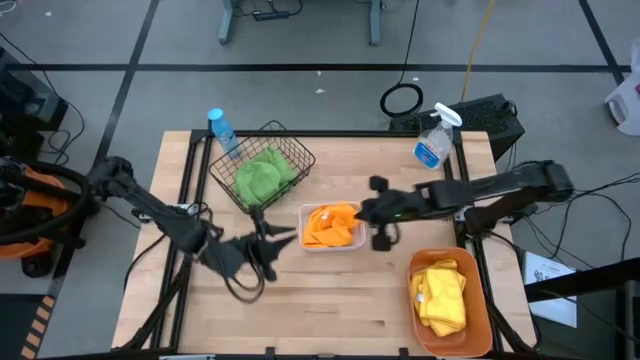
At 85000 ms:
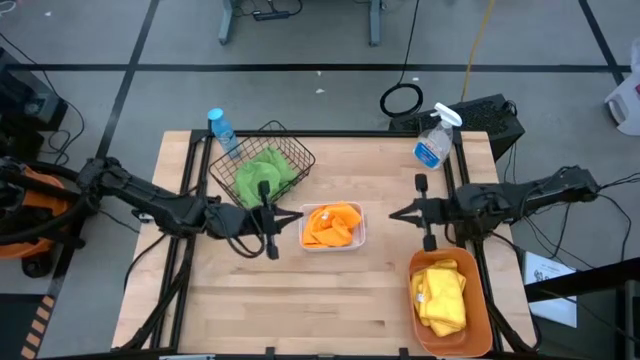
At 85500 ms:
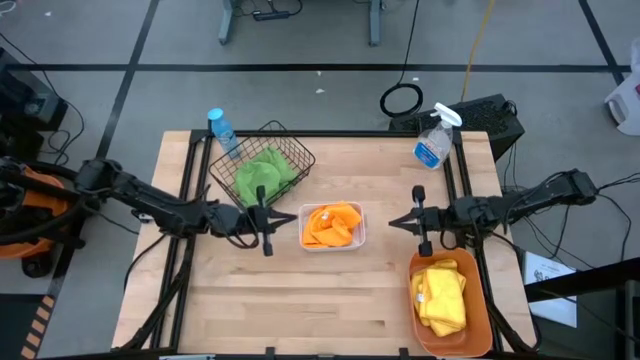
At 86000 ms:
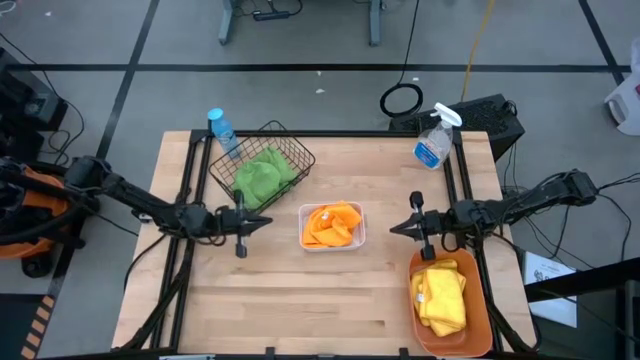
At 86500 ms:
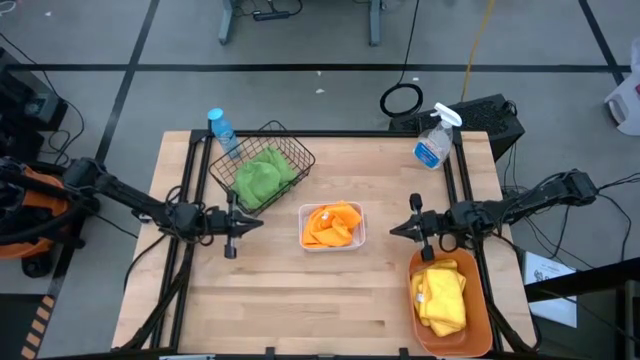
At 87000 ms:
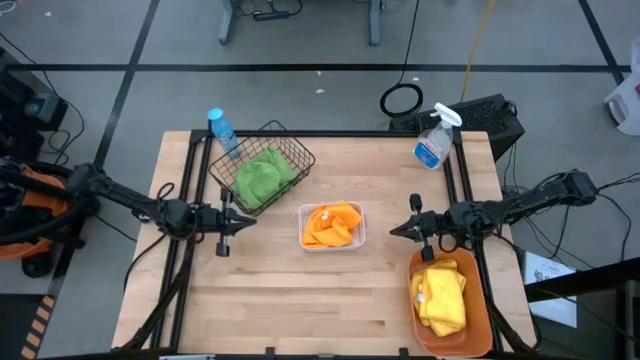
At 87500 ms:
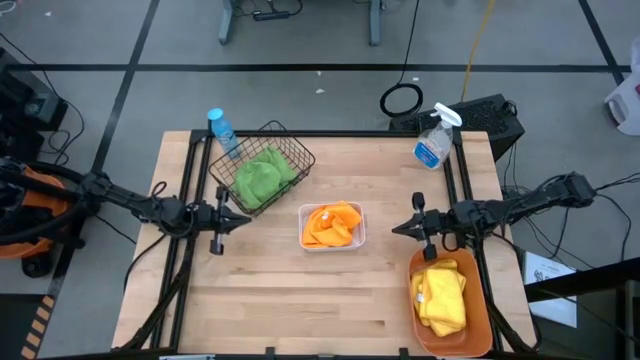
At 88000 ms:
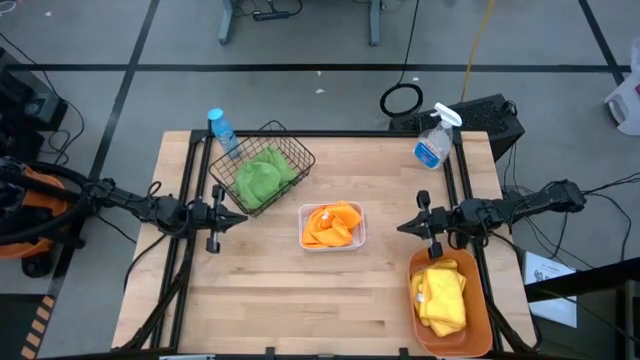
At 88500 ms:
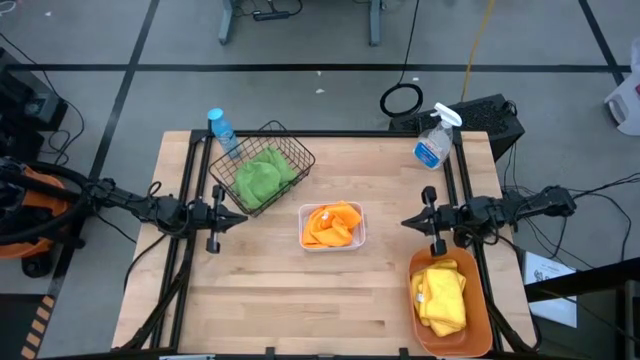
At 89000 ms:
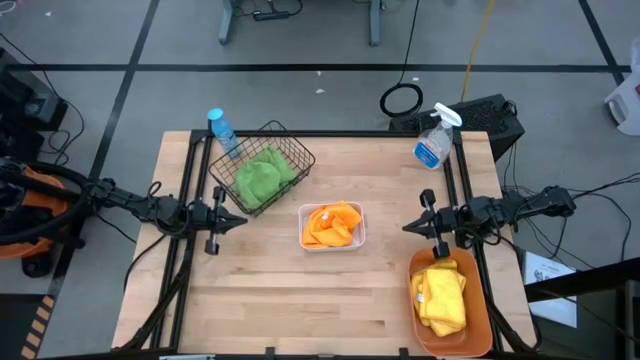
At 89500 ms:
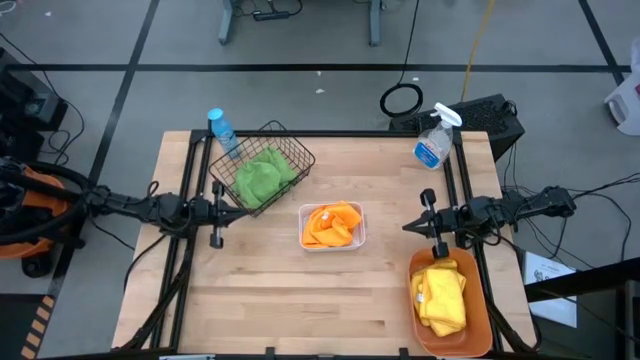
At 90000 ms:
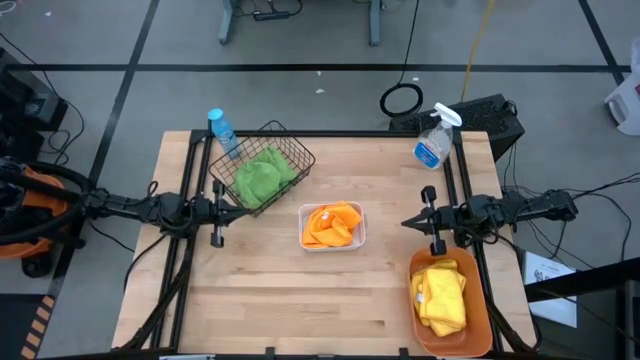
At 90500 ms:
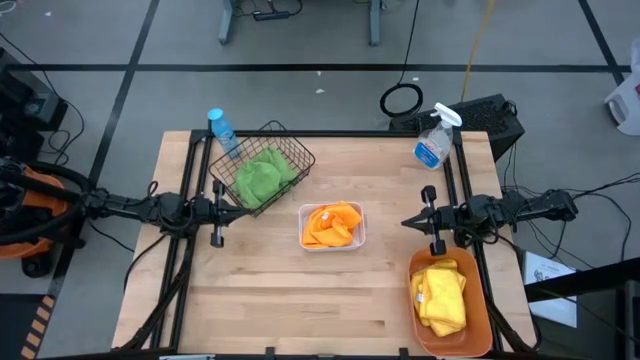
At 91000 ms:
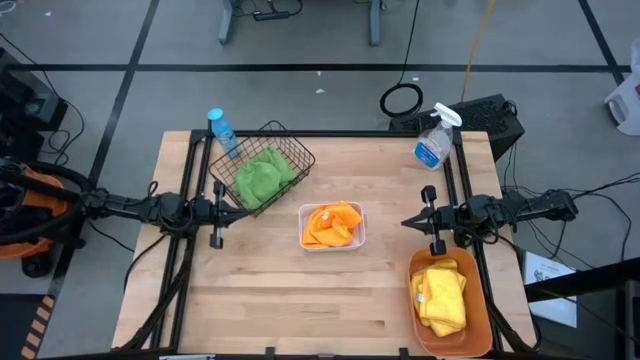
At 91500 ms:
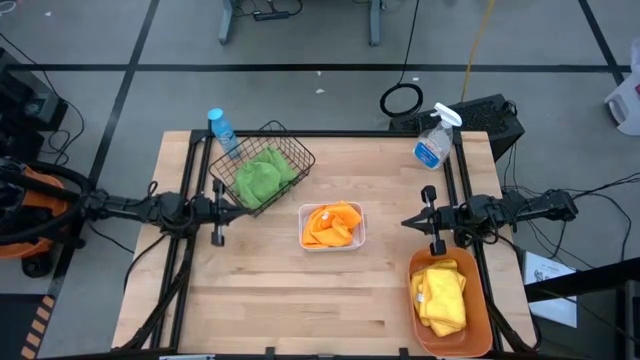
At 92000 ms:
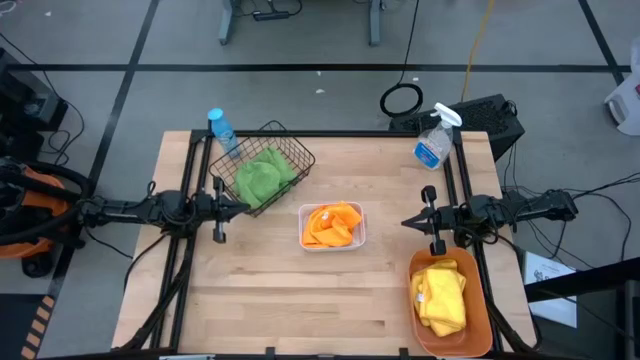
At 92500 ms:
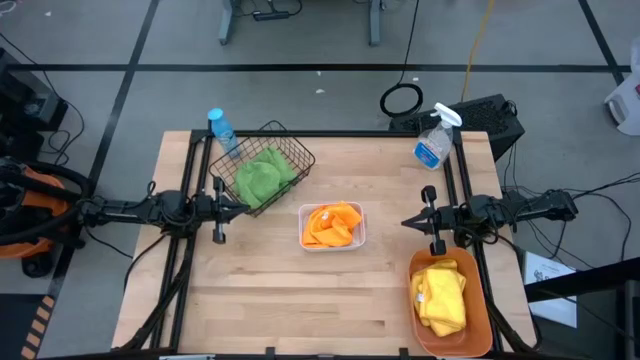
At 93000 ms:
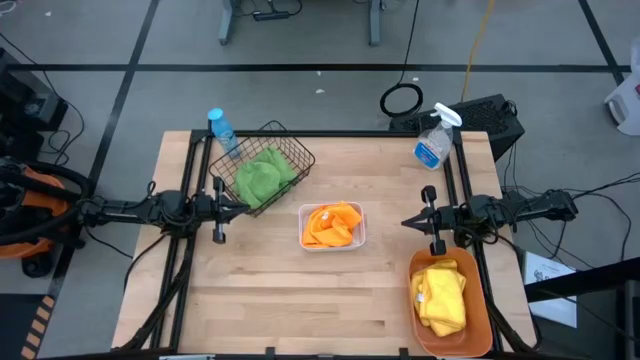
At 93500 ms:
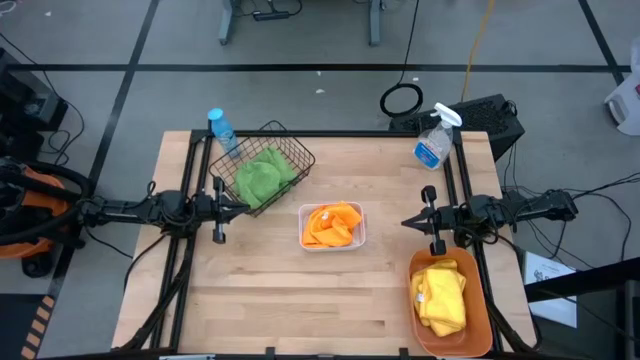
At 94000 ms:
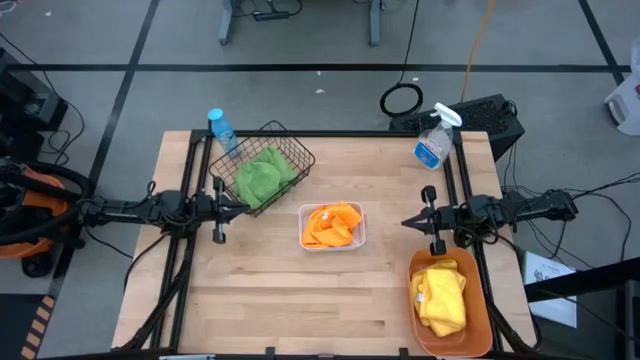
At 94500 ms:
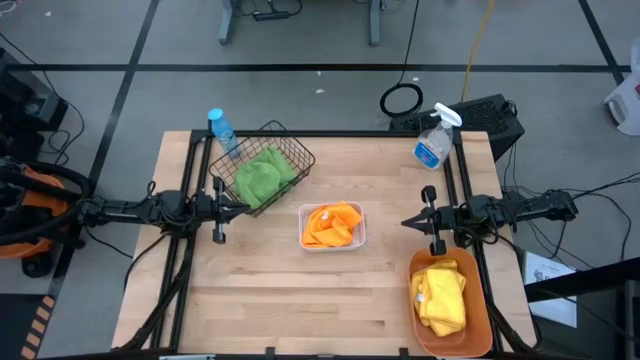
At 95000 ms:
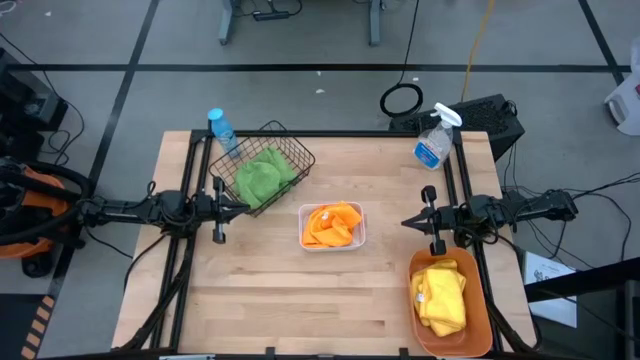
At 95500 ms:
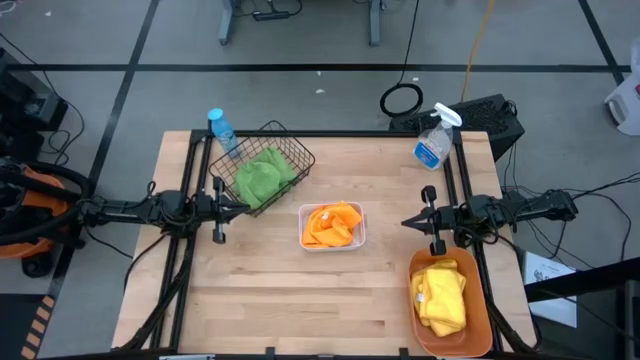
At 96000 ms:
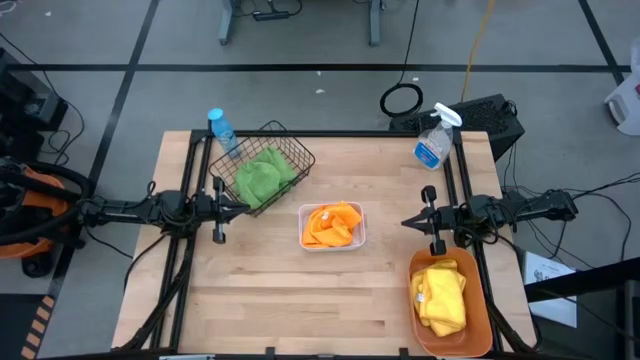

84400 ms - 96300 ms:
Task: Sort microfiber towel by color & place in baskets
Return to Home Position

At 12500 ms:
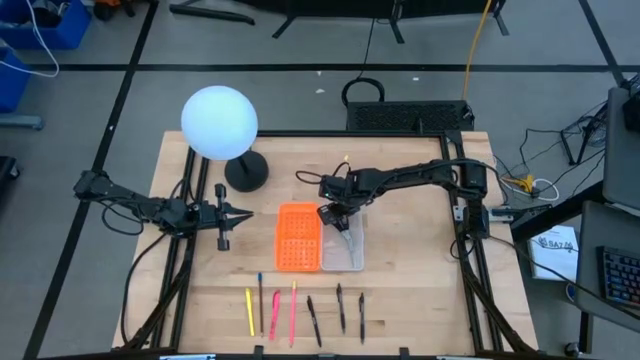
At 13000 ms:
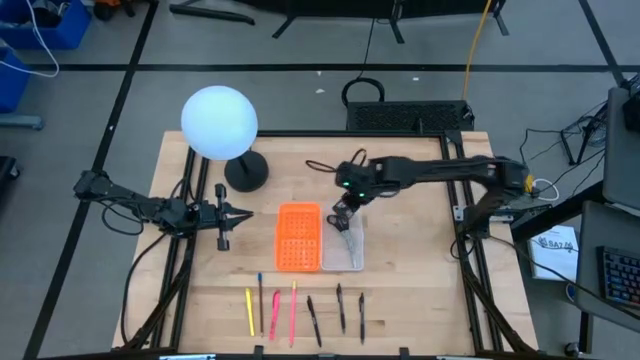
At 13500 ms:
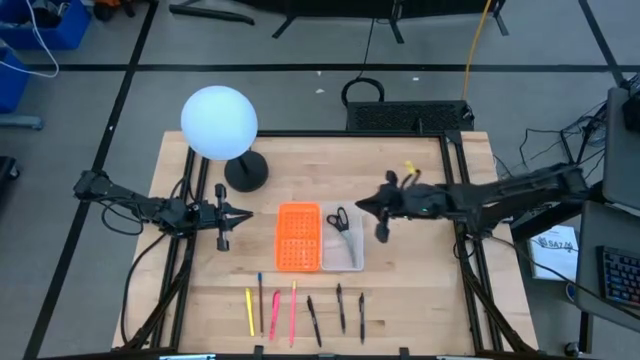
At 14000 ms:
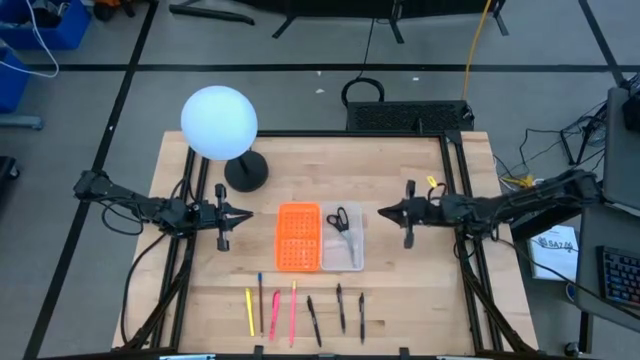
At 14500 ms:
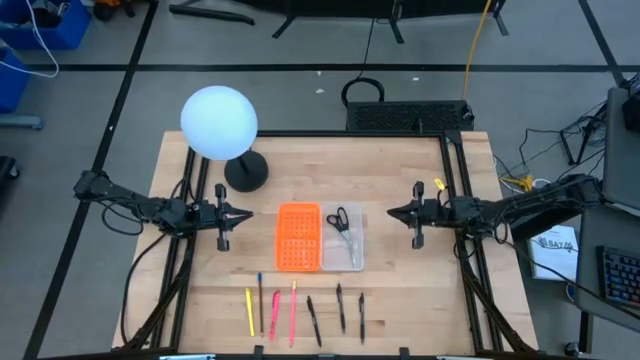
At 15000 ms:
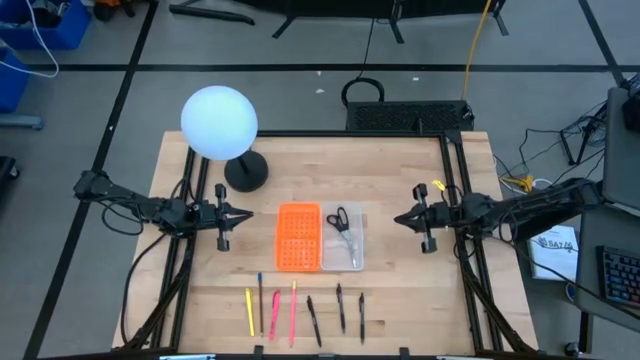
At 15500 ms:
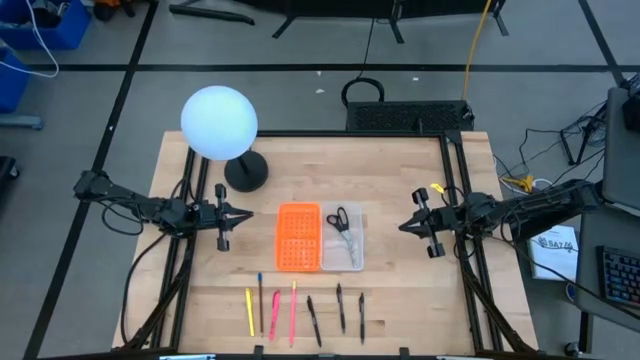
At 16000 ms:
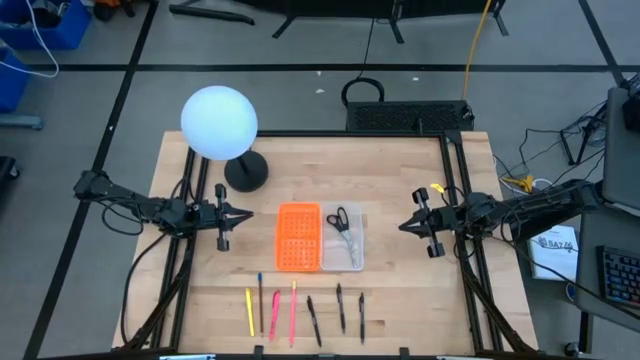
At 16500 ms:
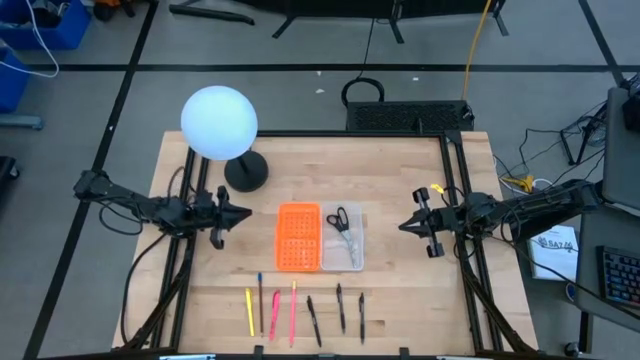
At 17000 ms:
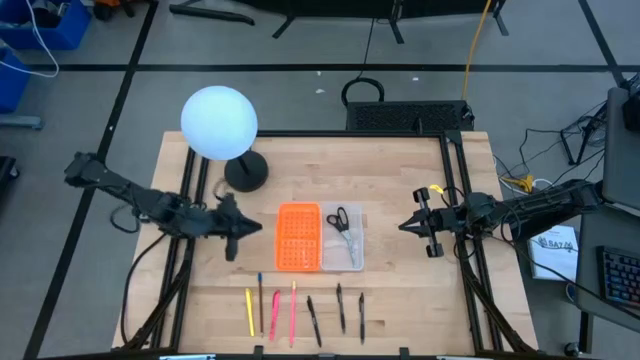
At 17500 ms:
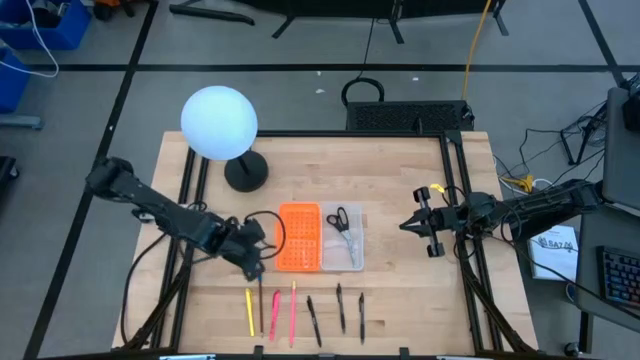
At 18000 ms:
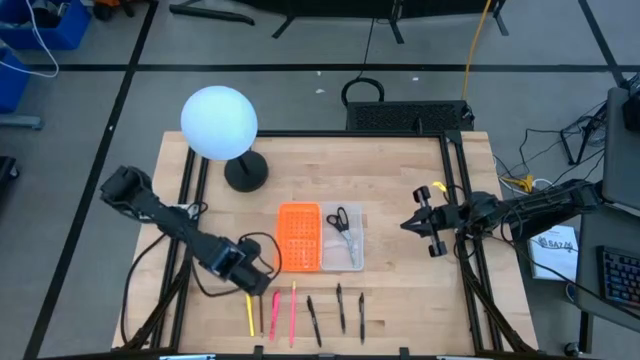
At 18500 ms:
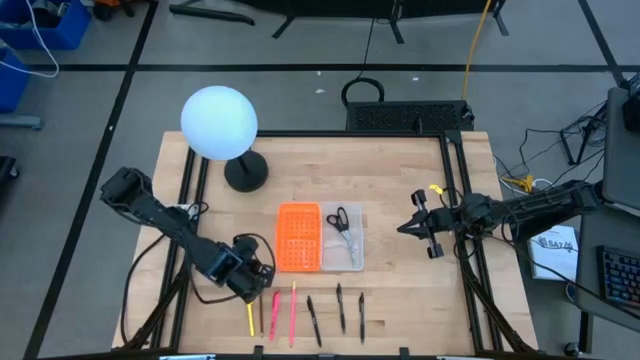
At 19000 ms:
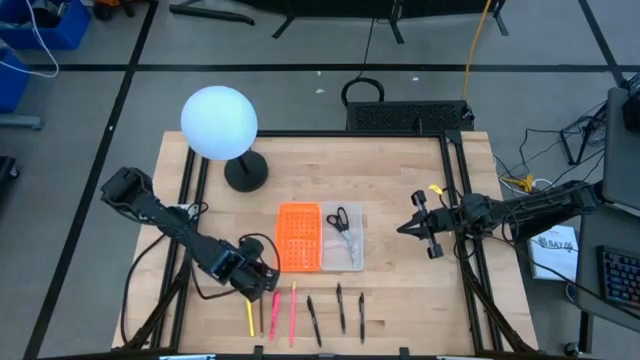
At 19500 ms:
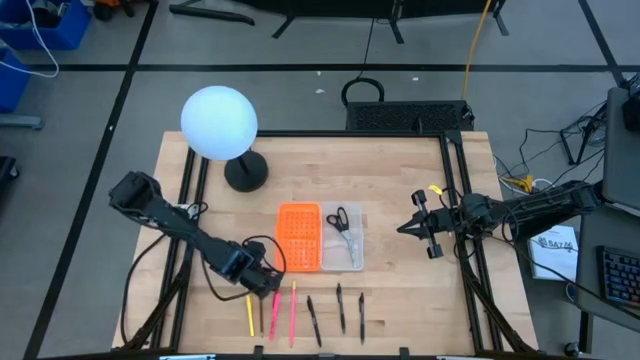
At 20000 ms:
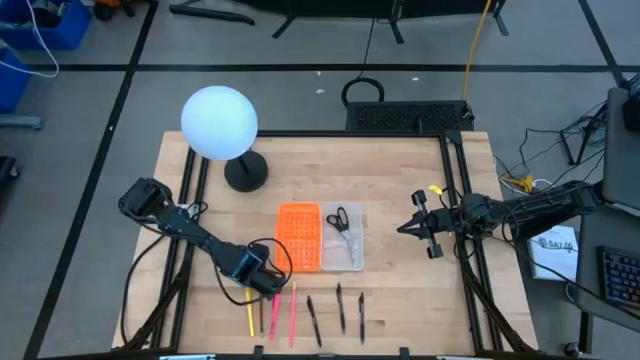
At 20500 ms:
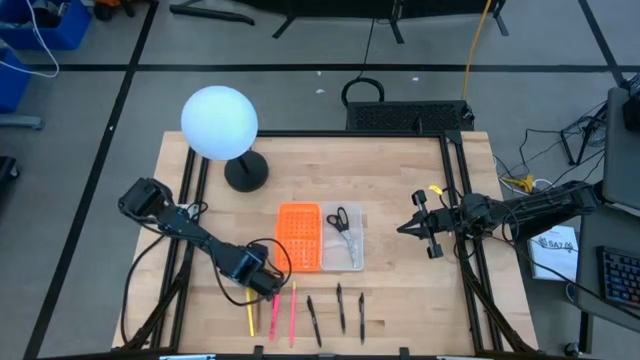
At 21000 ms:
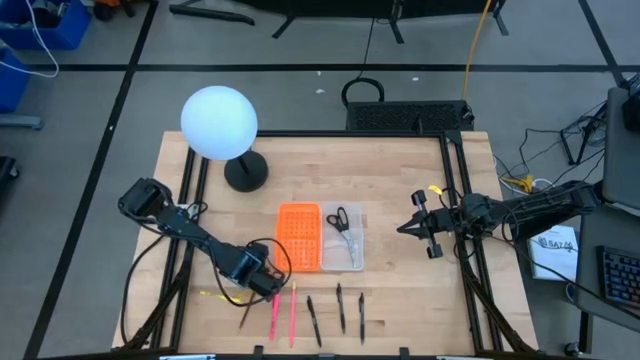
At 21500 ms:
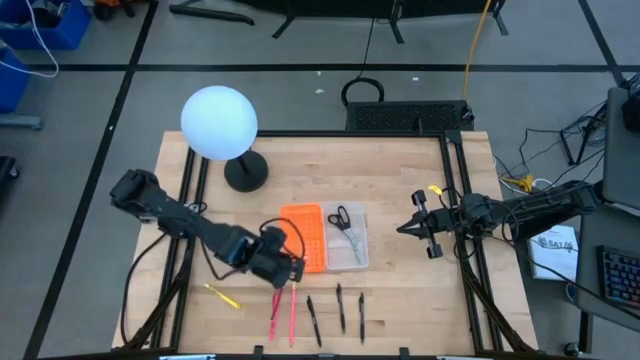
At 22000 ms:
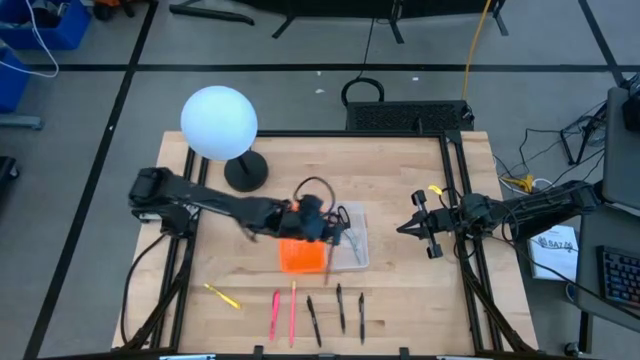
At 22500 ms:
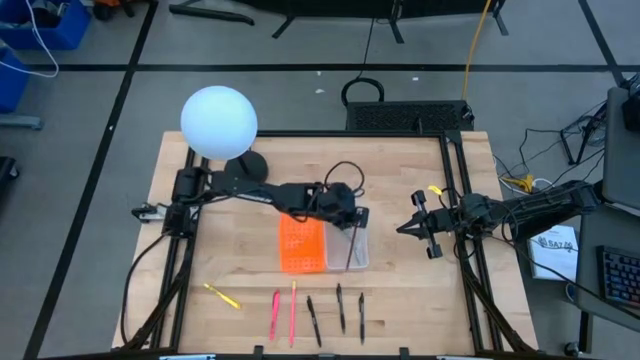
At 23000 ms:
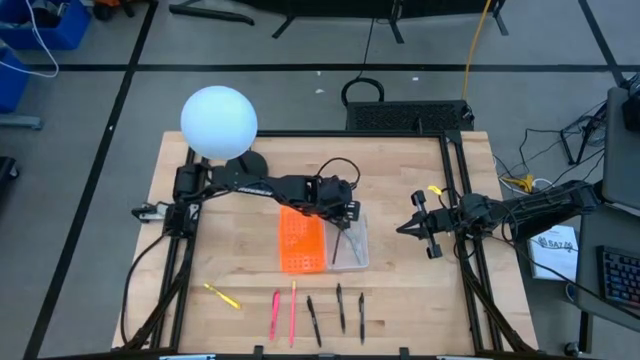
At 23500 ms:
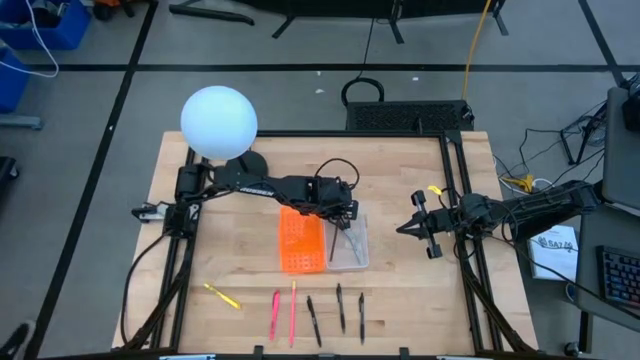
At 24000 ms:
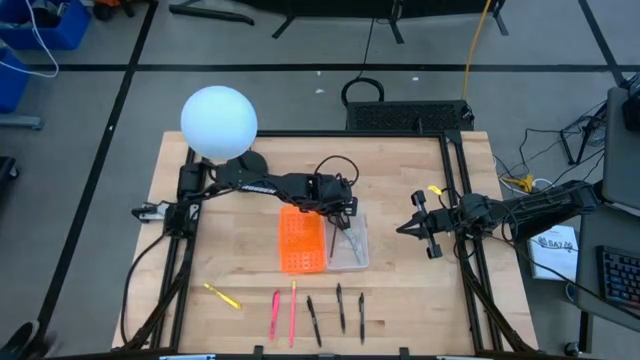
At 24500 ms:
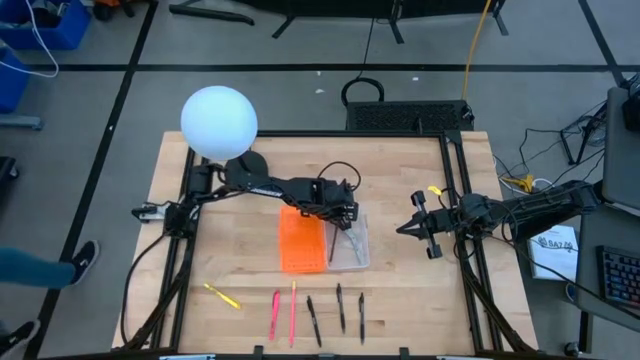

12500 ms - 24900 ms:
Task: Pick & place school supplies into a supply box
Put the brown pencil with the blue tip into the orange and white supply box
